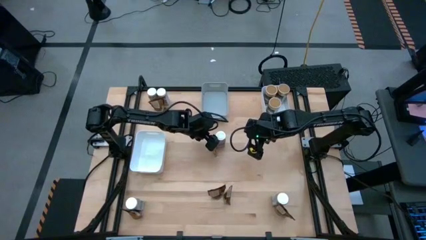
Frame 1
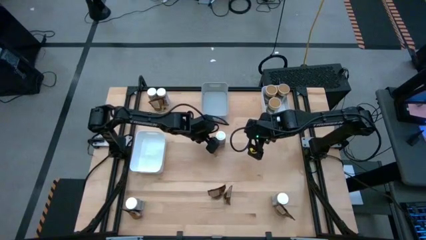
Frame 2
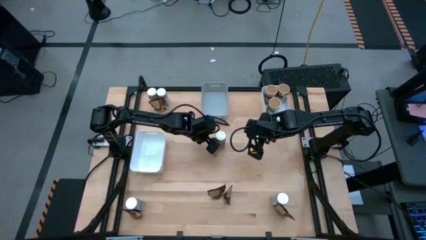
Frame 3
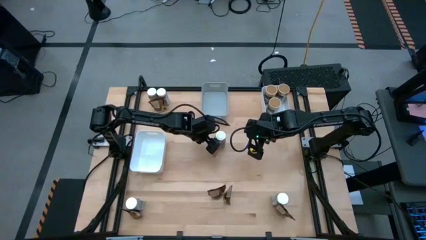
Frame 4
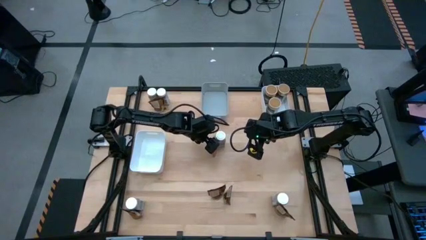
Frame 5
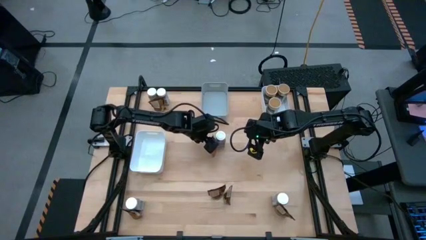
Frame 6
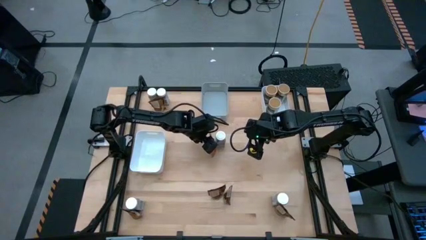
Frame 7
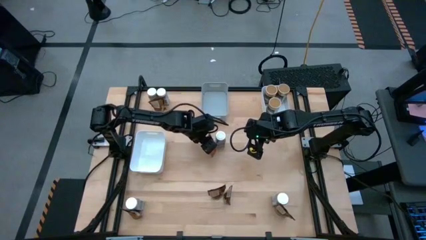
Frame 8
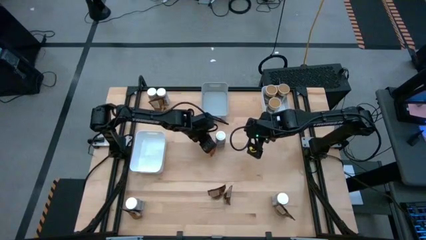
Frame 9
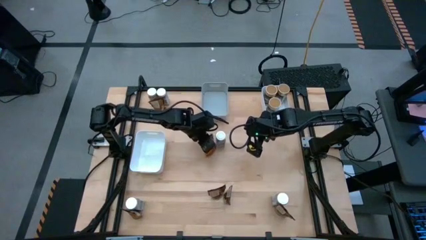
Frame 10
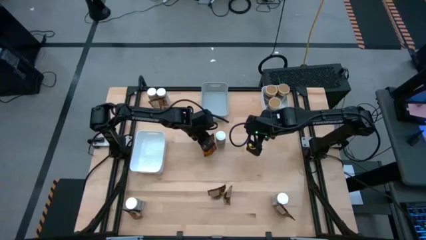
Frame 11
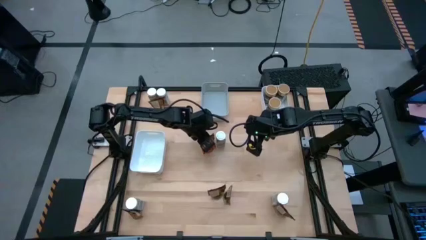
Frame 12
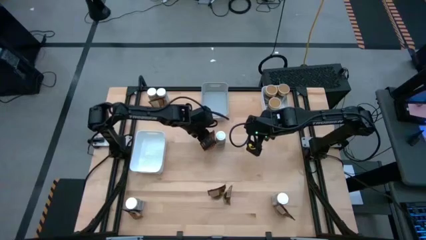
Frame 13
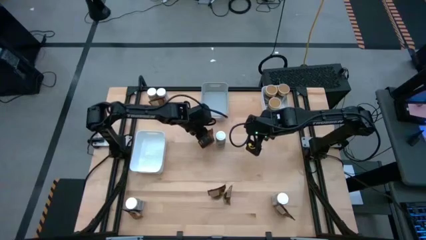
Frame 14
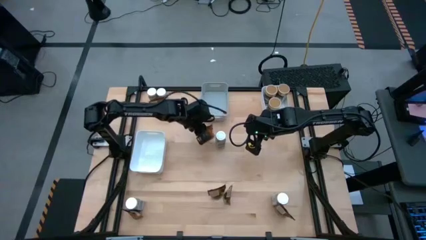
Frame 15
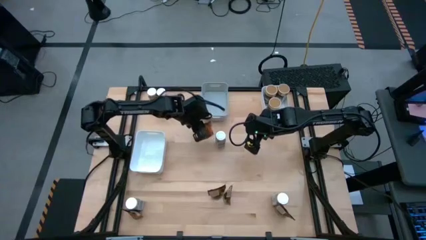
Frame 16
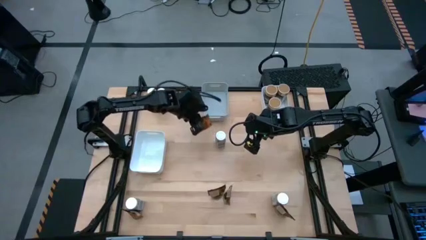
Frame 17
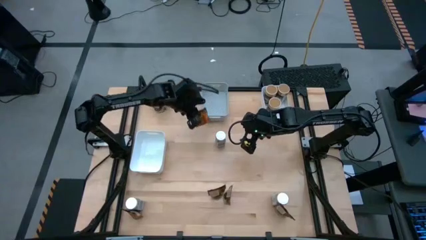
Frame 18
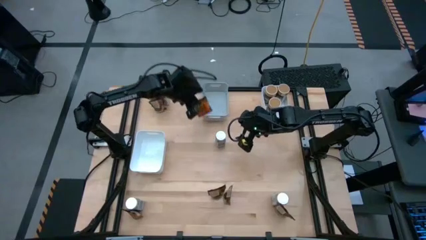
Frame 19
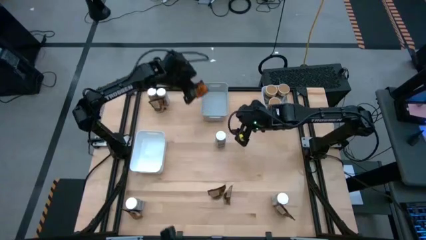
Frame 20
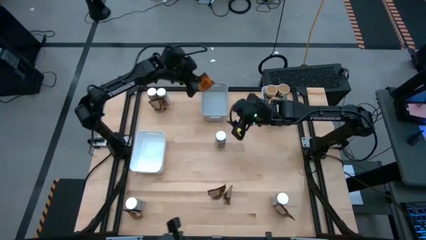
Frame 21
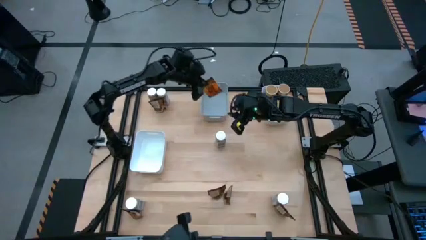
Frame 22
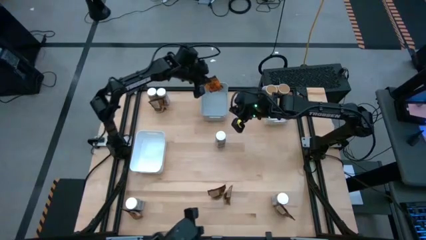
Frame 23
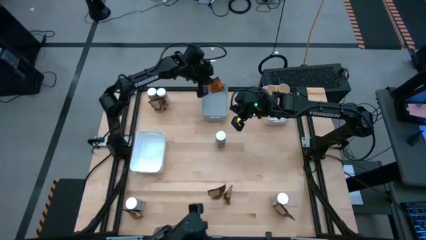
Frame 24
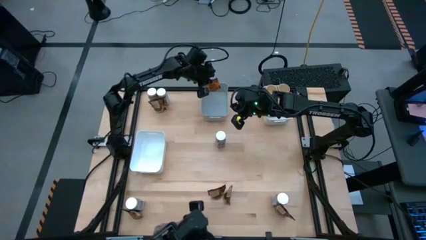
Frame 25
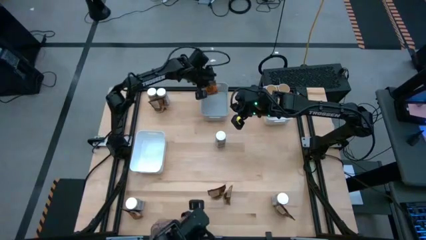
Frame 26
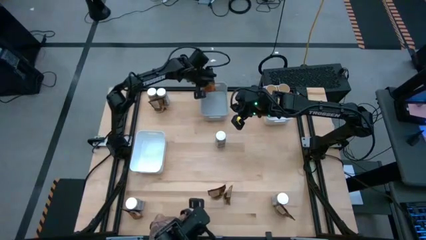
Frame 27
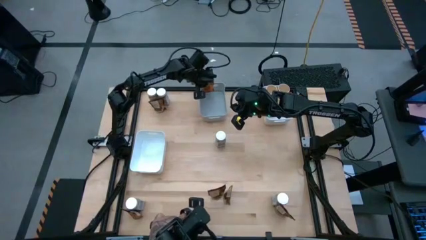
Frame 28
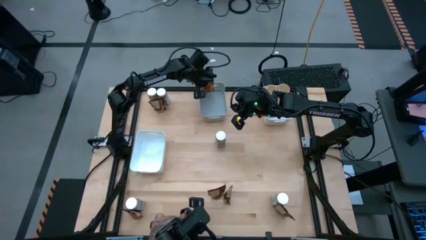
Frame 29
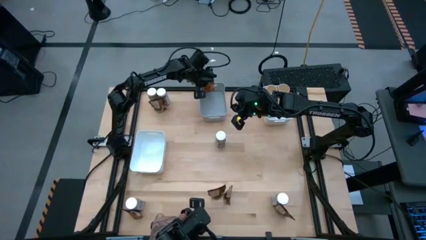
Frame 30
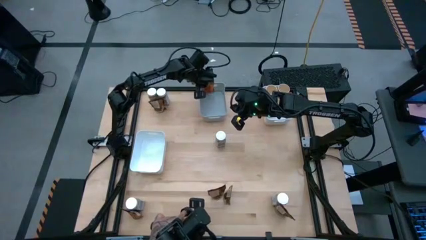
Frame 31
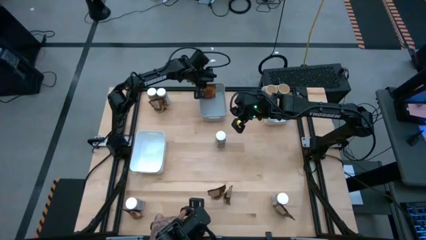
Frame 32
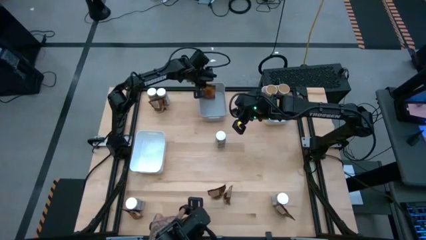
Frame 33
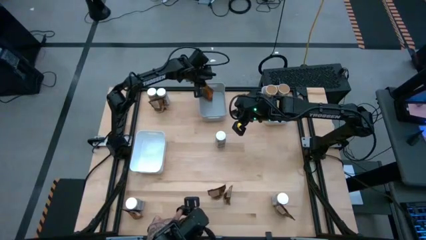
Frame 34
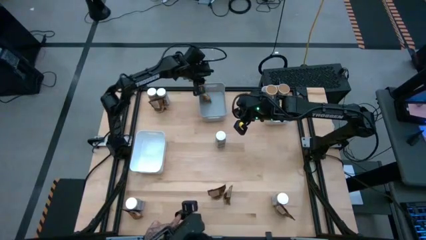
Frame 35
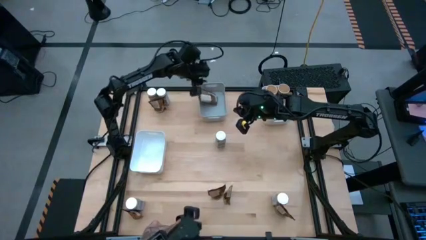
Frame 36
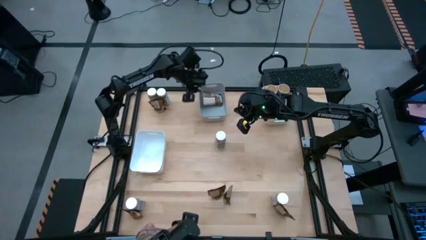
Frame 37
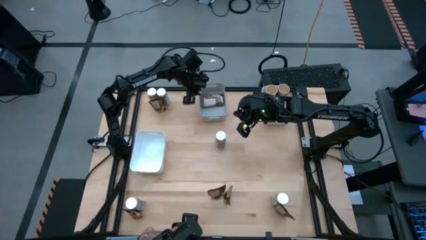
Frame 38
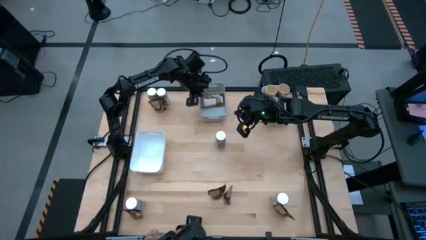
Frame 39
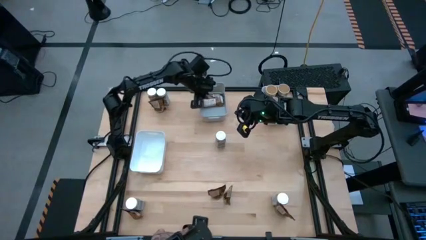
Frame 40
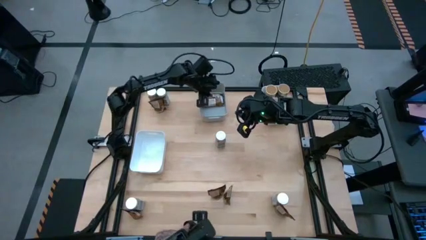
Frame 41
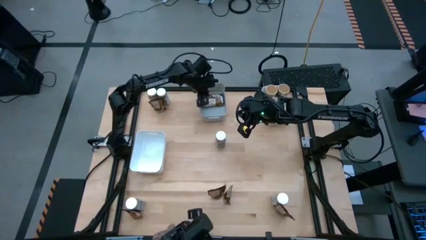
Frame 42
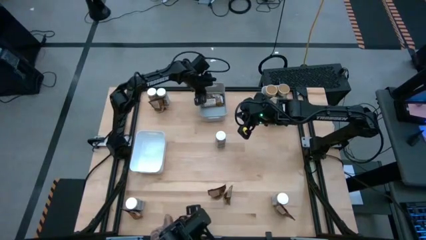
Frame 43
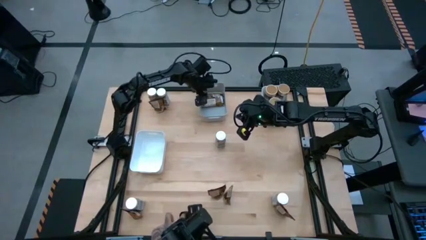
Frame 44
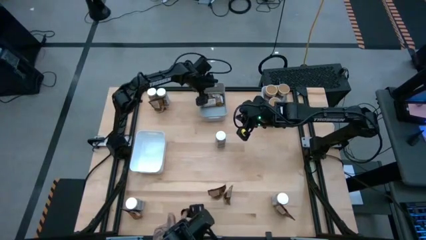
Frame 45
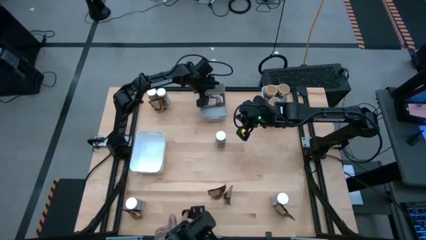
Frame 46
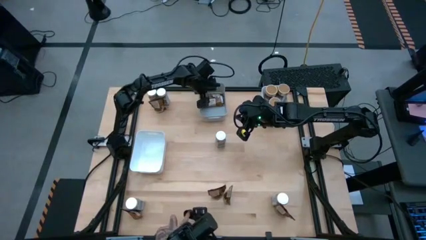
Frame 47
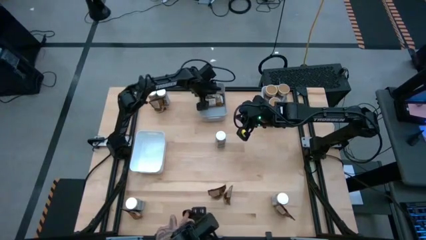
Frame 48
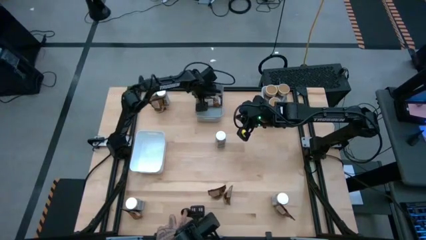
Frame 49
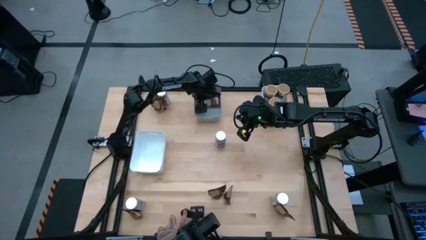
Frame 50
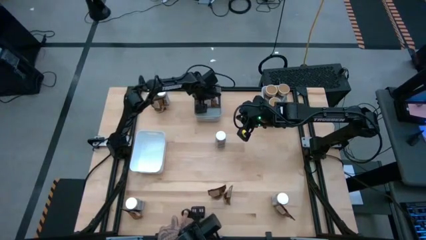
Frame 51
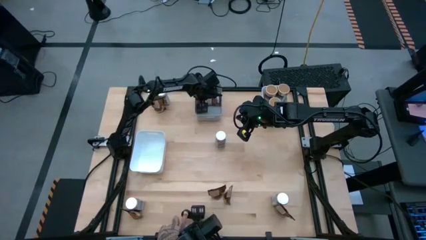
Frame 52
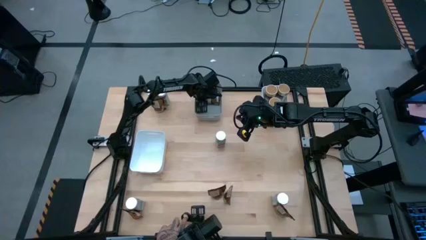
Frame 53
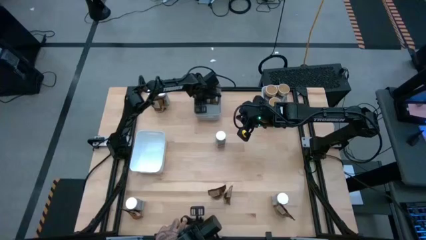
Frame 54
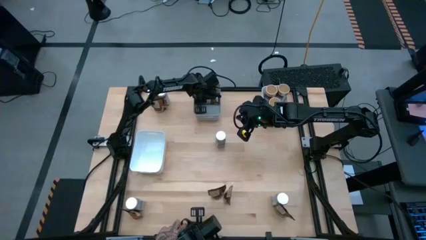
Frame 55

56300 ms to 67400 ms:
Task: Sort spices by type
Put the orange spice pack into the gray bin

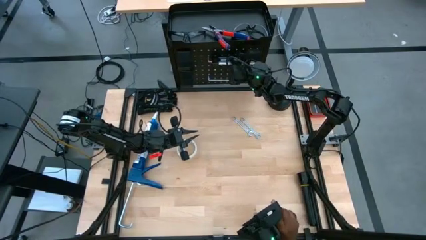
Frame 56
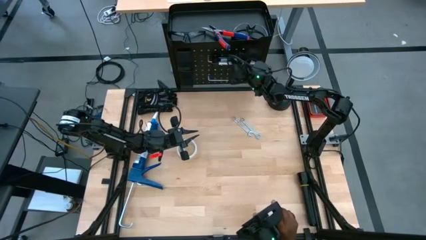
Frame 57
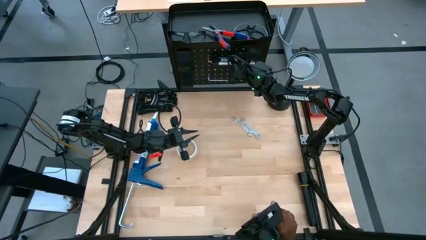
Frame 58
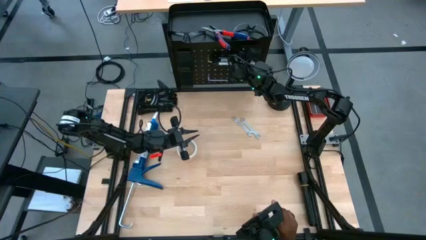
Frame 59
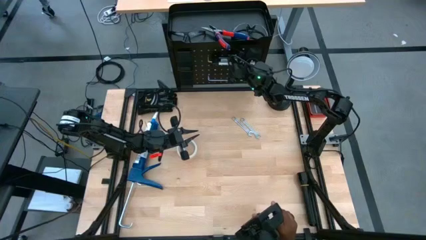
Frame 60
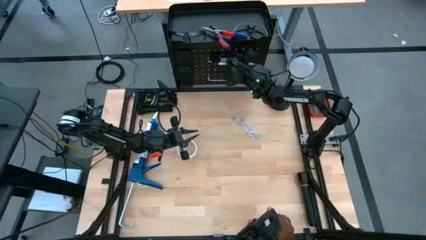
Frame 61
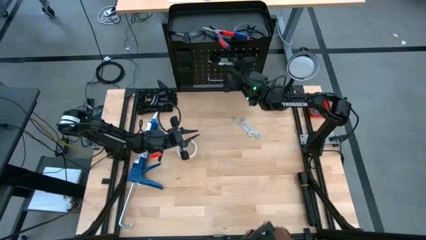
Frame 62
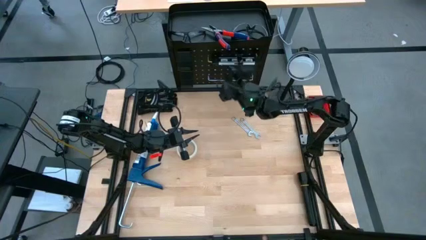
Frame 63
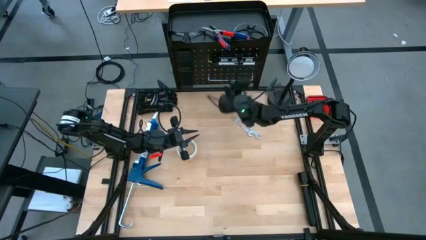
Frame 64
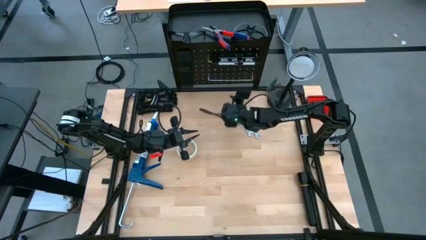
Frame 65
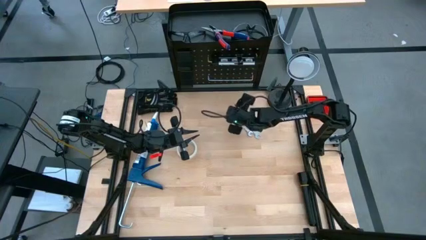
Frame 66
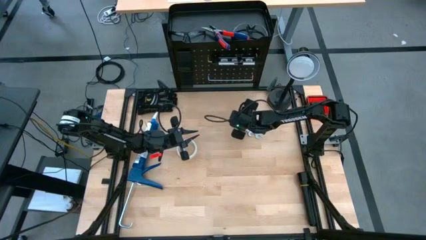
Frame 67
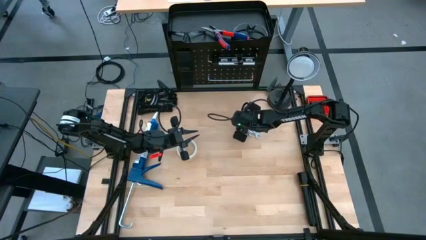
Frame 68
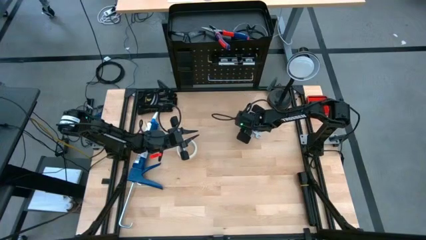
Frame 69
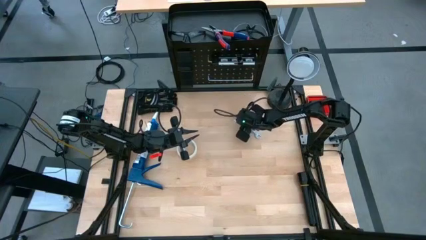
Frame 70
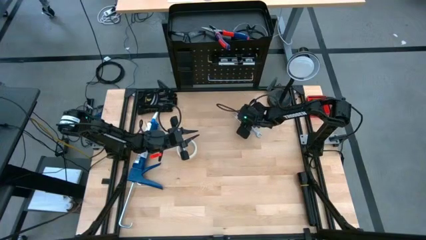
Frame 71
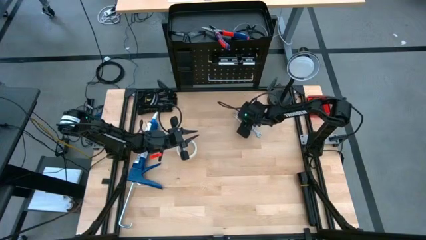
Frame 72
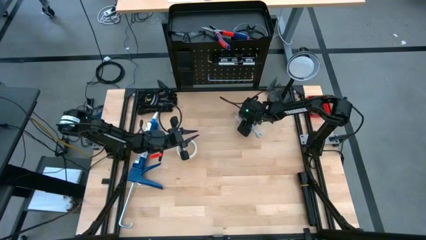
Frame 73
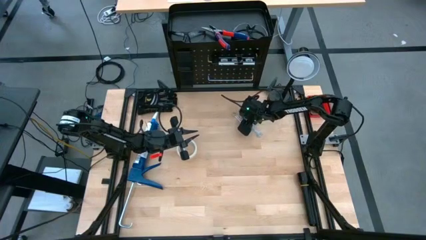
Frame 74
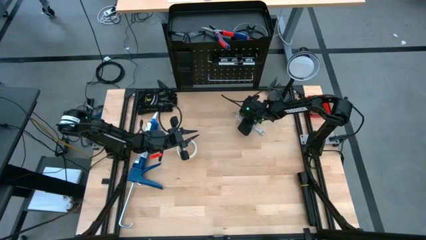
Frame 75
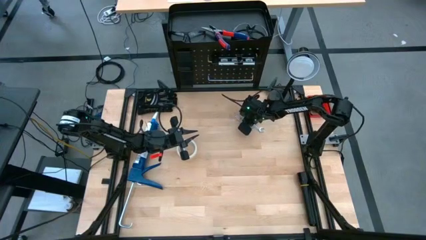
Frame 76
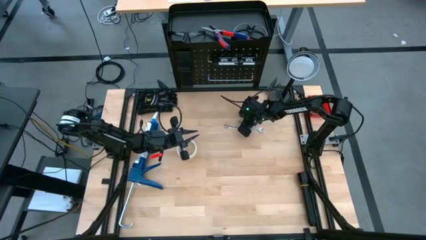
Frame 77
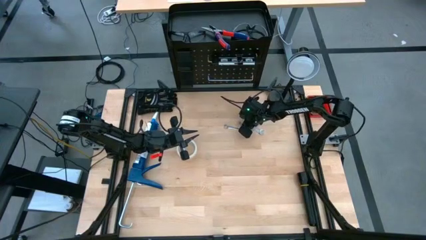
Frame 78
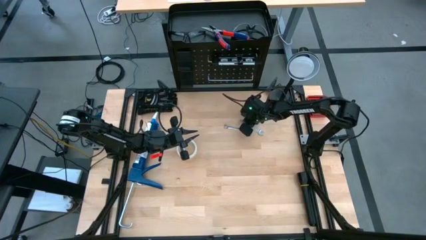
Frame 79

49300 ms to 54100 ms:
Task: Hang tools onto peg board
Hang the silver right wrench on the black peg board
